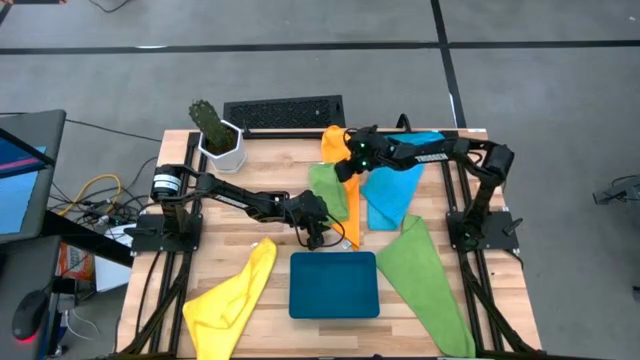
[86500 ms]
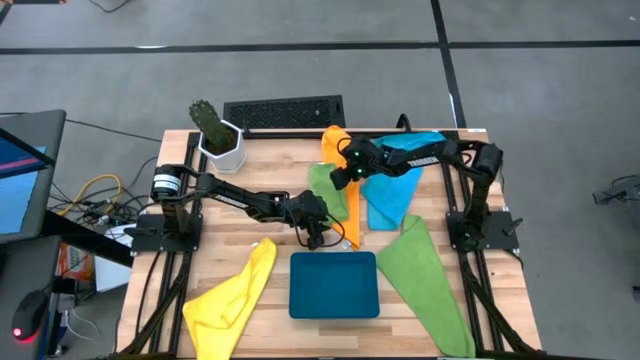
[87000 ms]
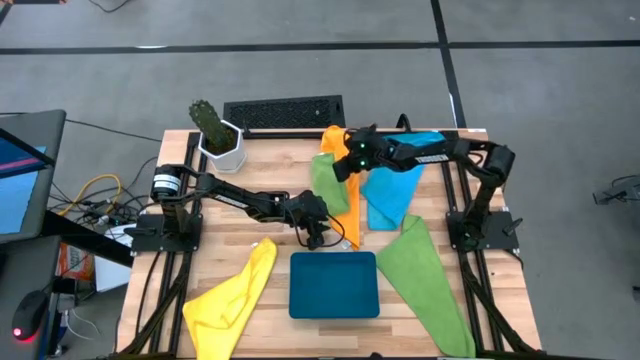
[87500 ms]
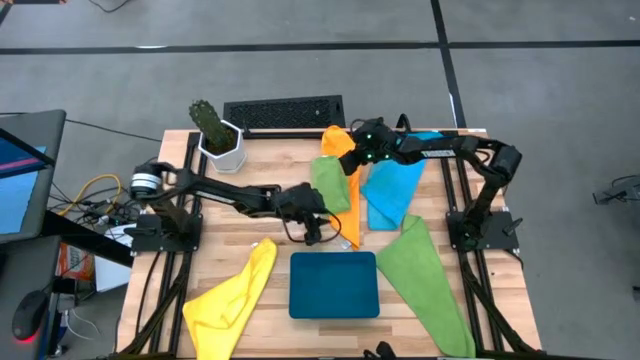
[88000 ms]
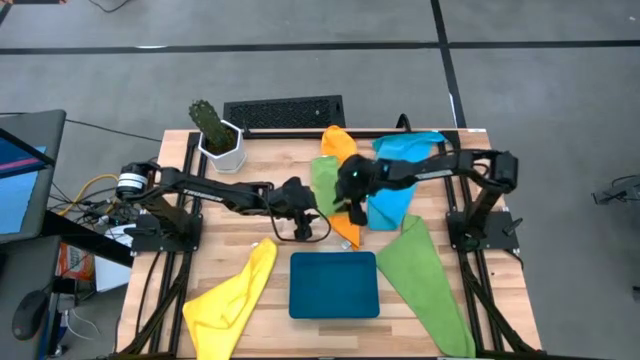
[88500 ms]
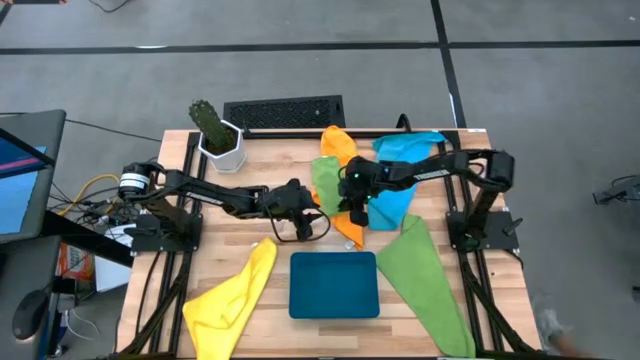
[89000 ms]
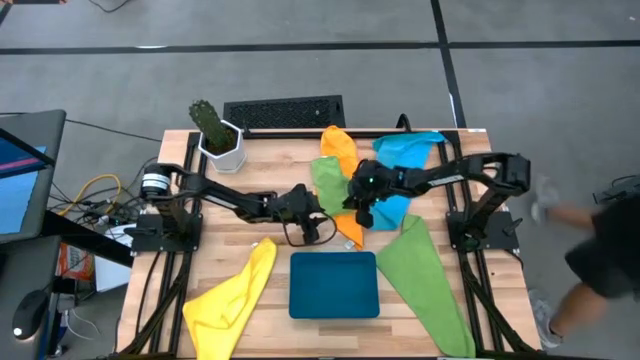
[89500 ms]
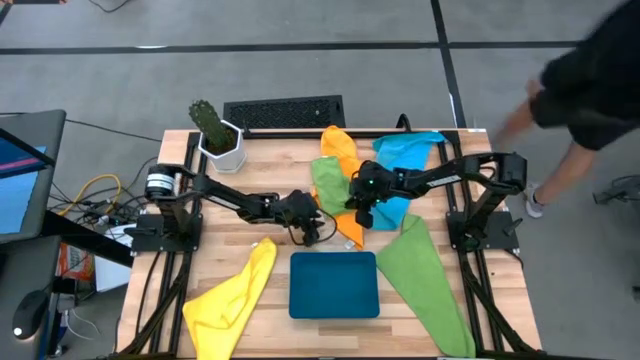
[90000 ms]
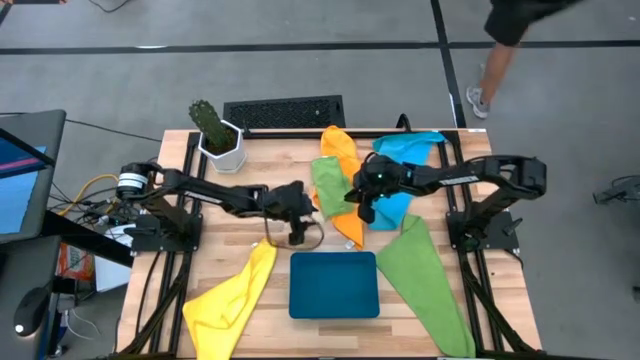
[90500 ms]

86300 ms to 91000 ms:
Task: Fold microfiber towels
Fold the top green microfiber towel

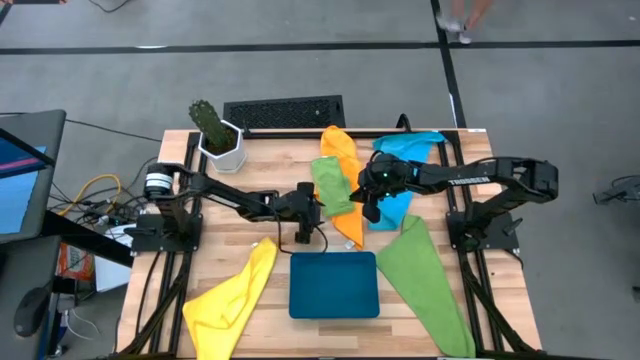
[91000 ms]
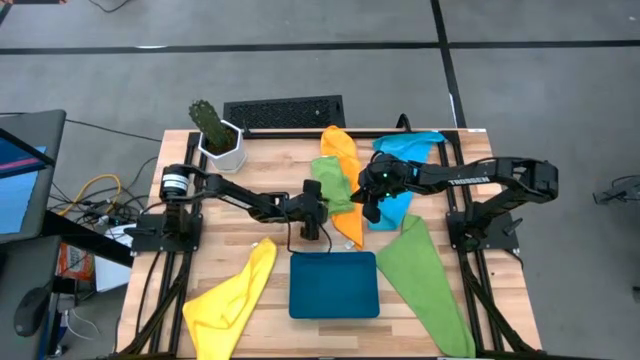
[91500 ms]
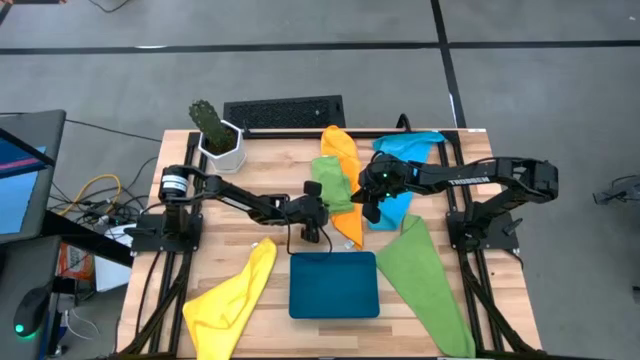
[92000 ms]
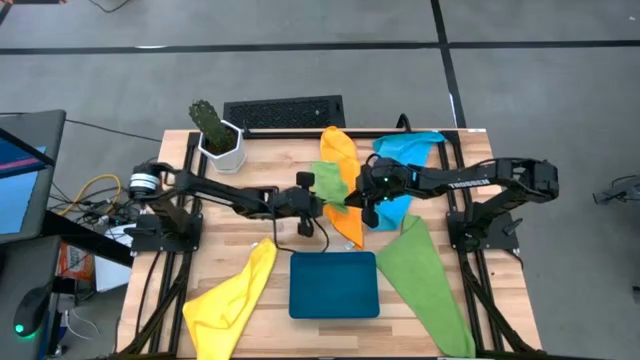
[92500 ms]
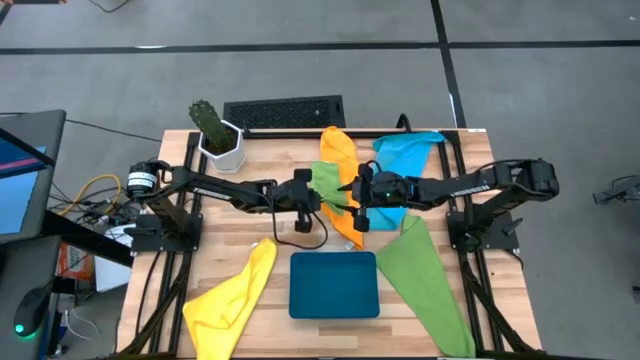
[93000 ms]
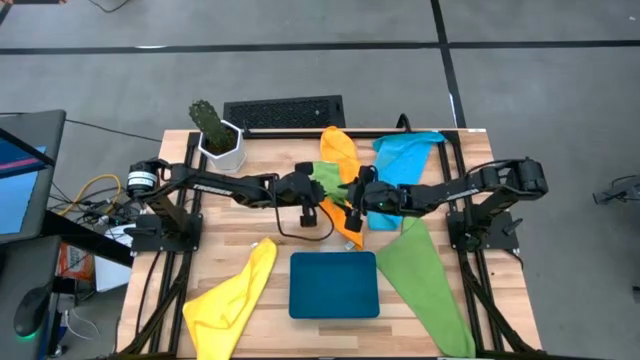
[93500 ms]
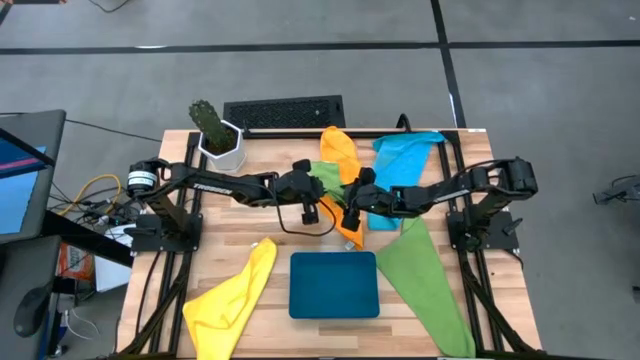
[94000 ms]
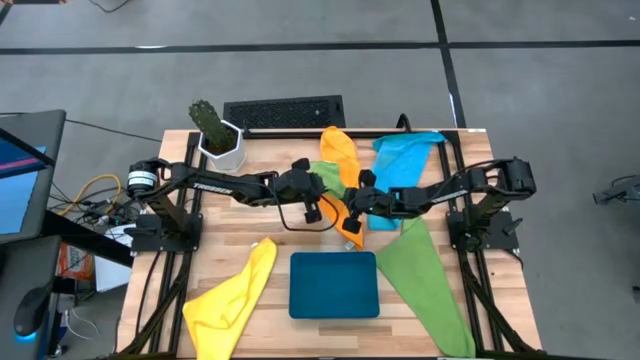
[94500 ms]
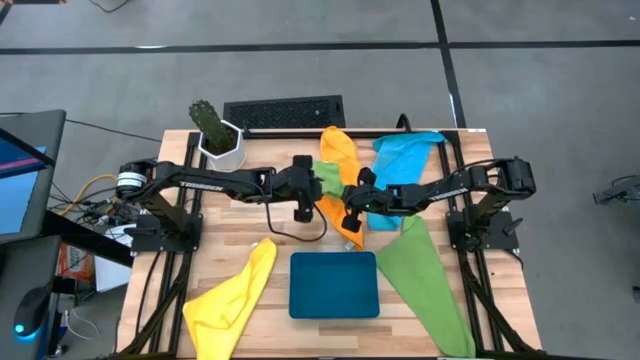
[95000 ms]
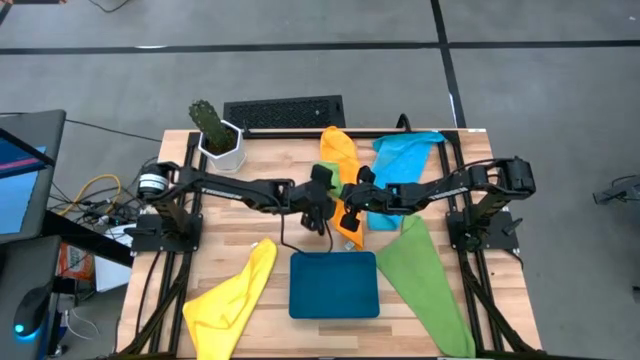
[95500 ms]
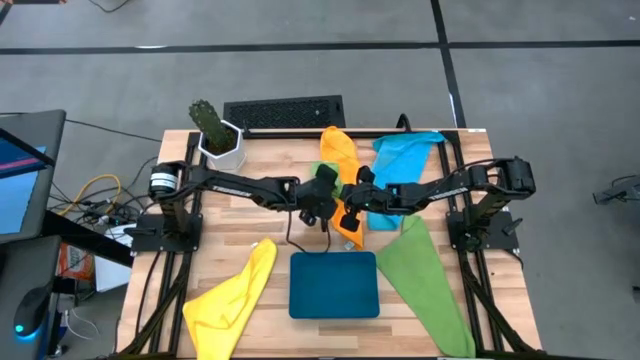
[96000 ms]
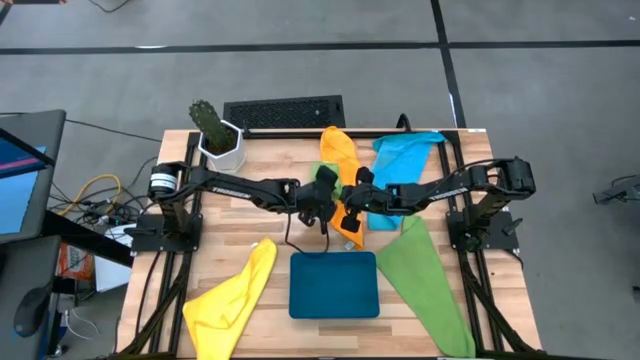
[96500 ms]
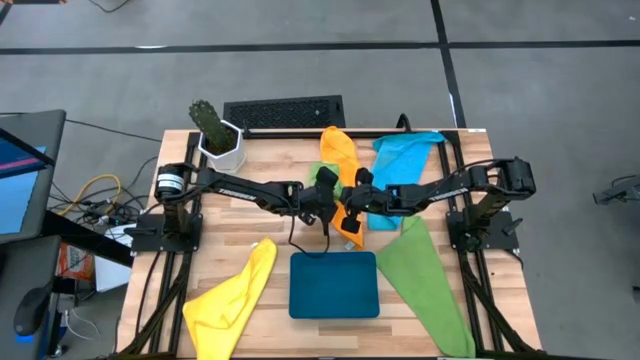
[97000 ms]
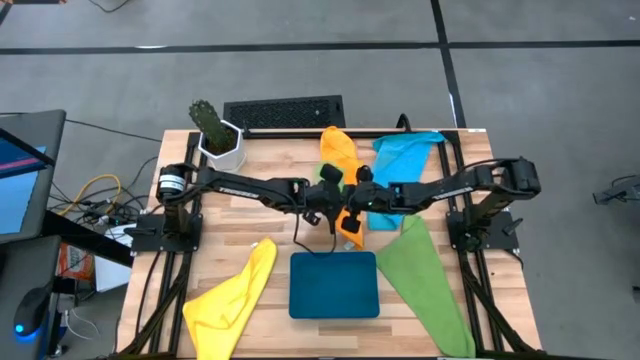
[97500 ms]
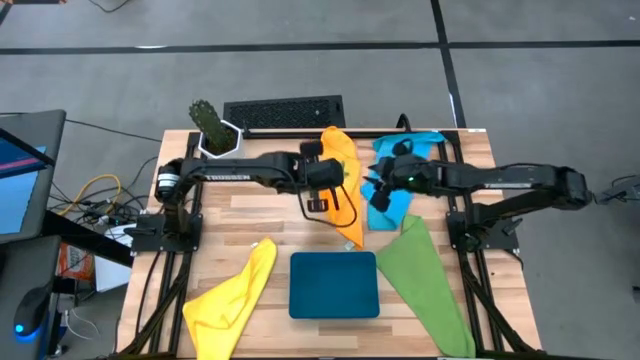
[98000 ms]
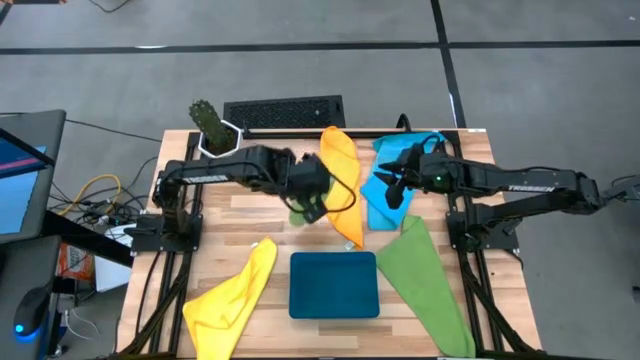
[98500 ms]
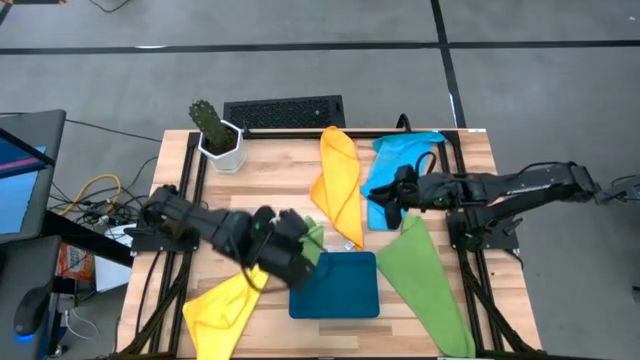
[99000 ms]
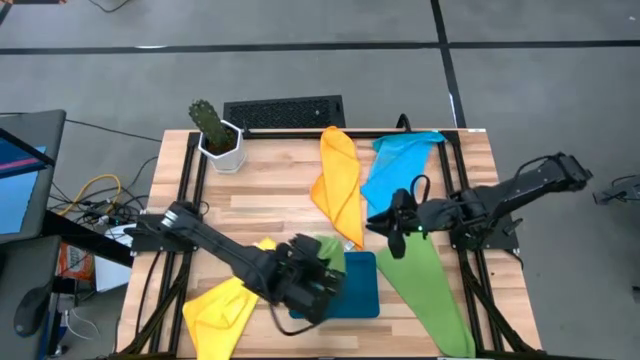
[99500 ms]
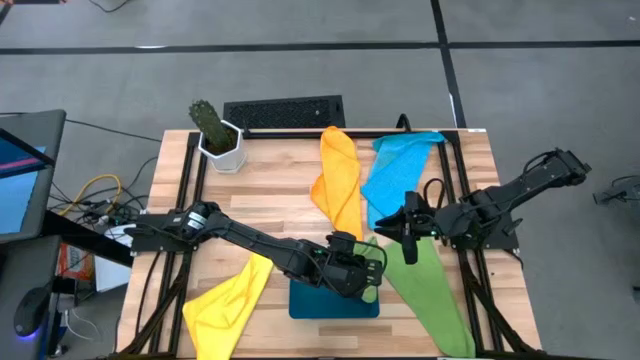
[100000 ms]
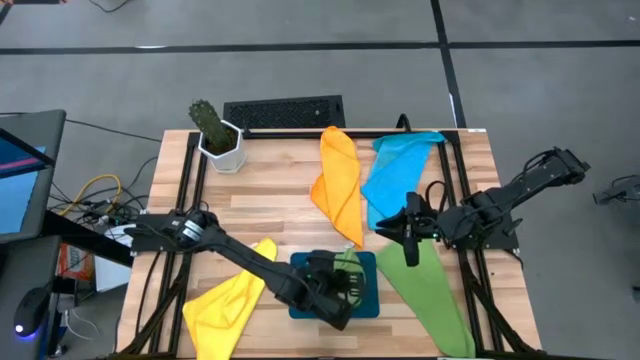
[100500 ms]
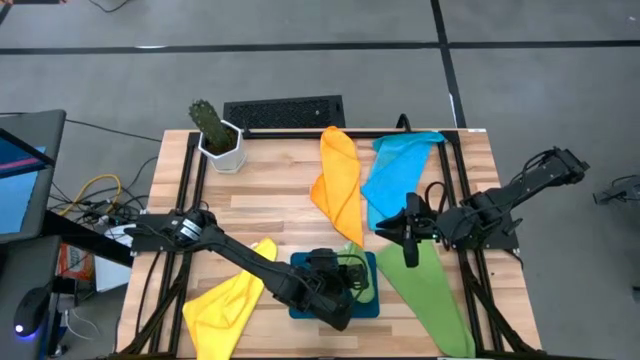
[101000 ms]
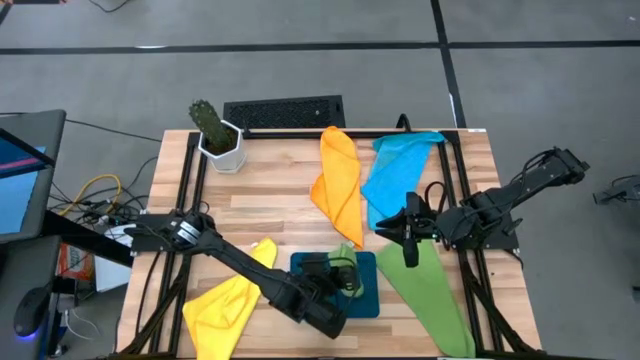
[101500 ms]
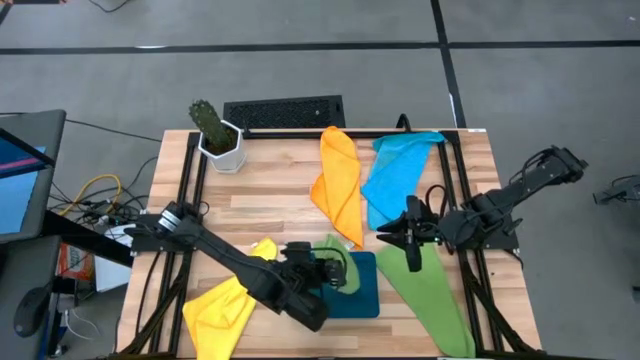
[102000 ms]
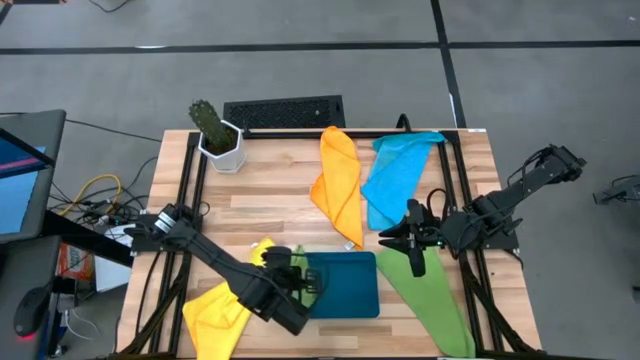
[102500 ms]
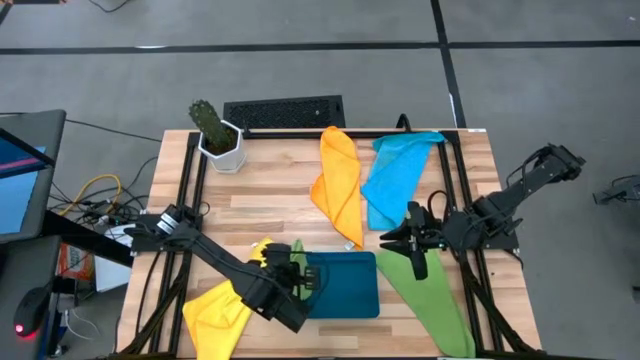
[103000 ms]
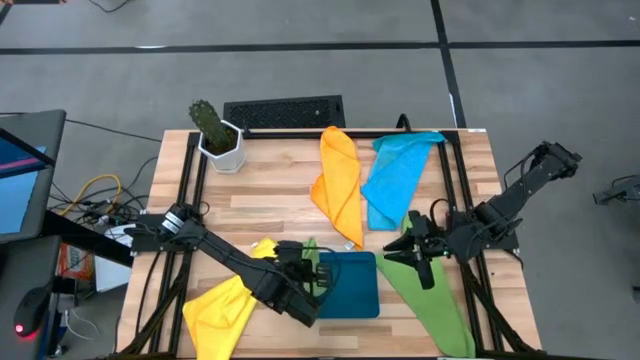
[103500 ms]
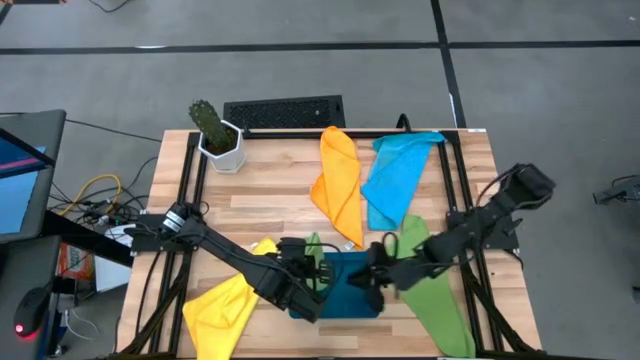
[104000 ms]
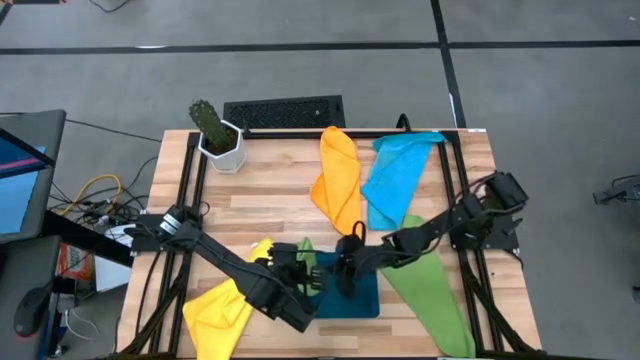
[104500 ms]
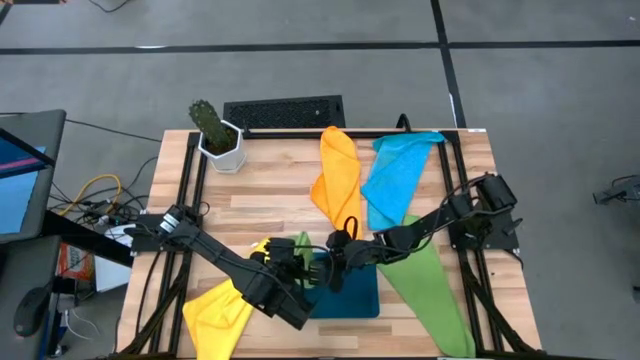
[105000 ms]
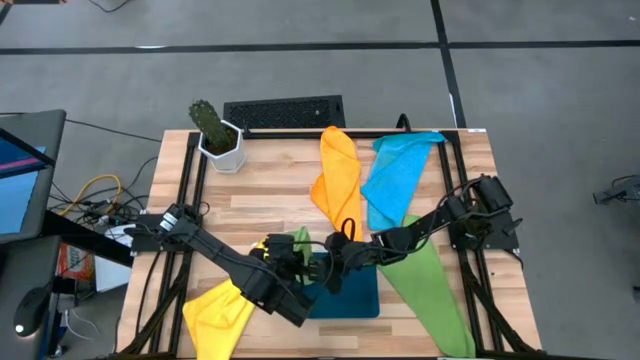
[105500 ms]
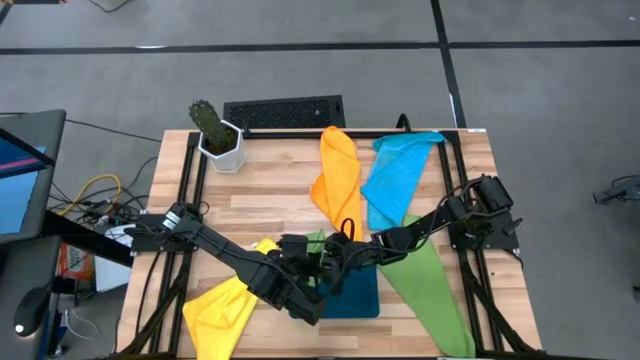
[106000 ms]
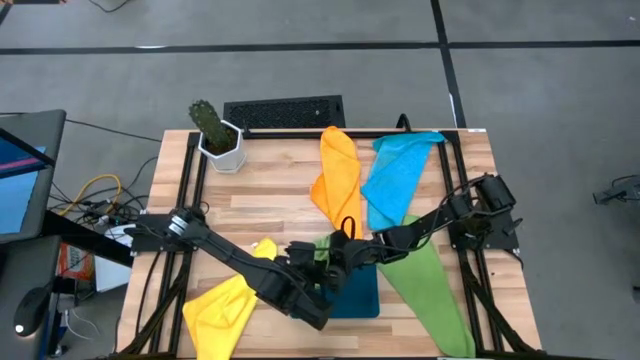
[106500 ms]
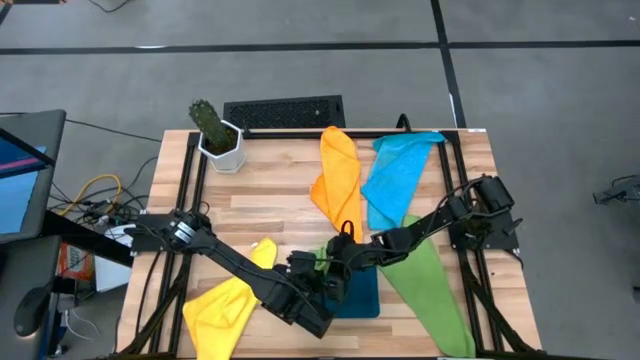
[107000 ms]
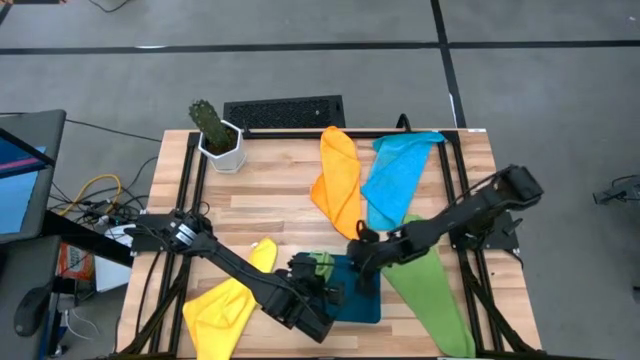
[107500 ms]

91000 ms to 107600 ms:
Put the folded green microfiber towel into the blue bin
